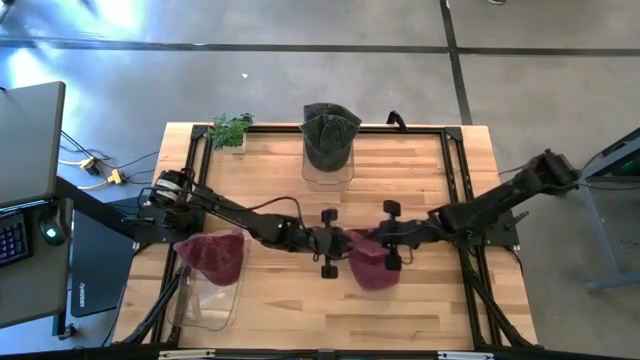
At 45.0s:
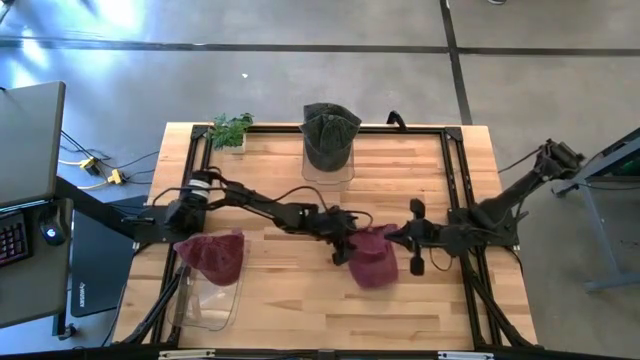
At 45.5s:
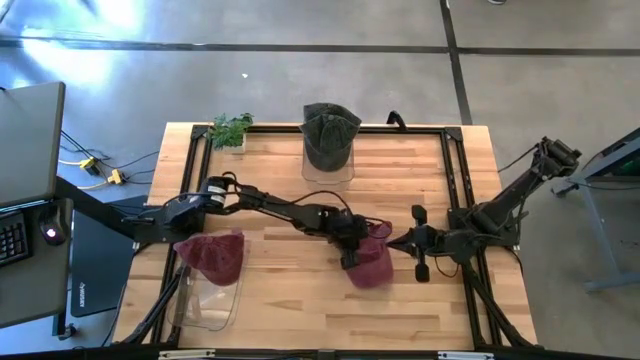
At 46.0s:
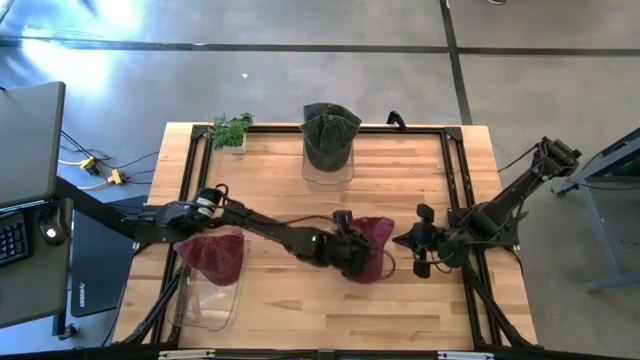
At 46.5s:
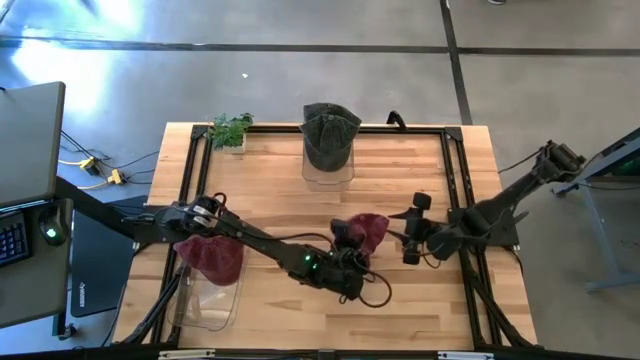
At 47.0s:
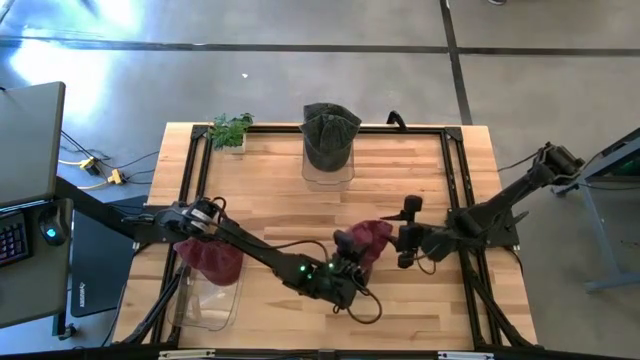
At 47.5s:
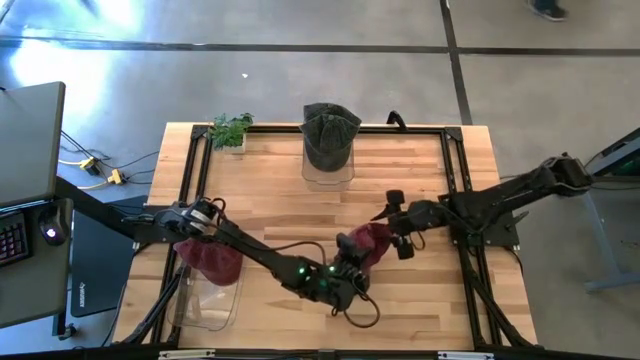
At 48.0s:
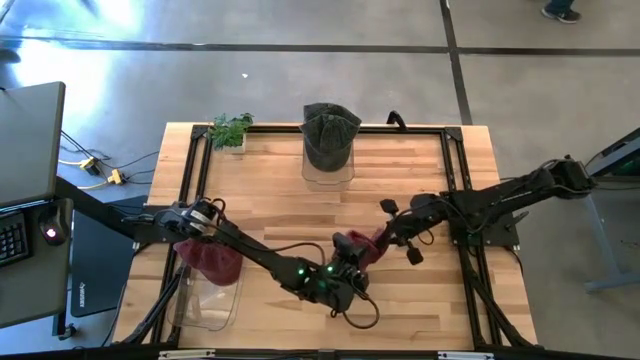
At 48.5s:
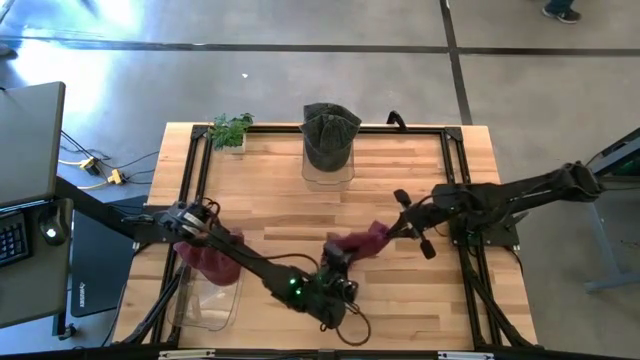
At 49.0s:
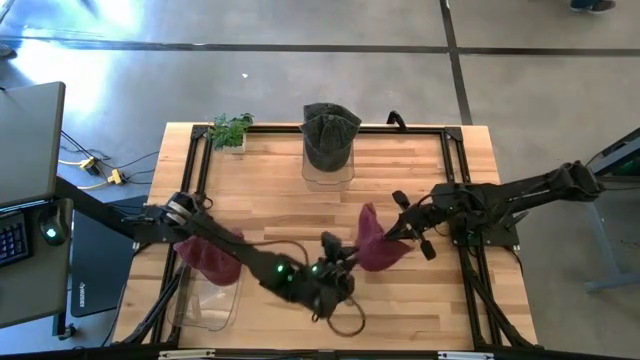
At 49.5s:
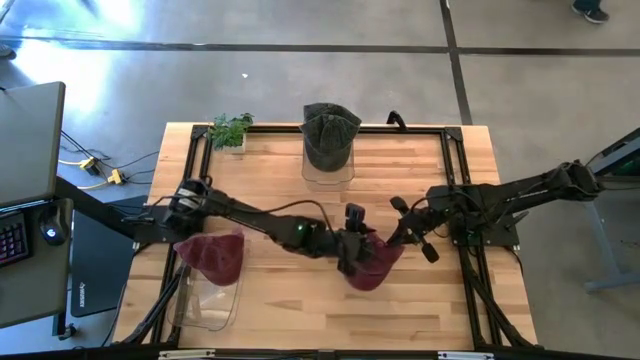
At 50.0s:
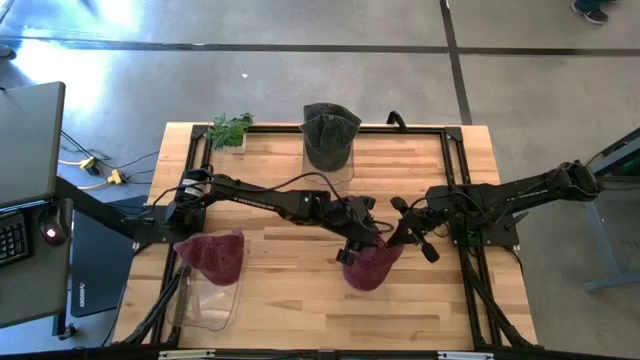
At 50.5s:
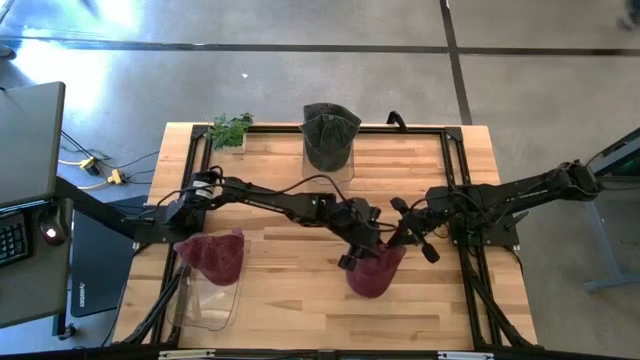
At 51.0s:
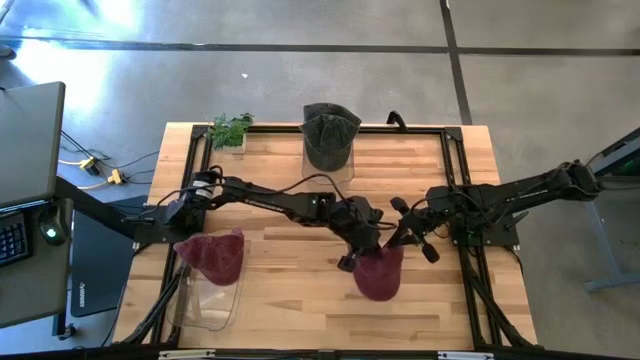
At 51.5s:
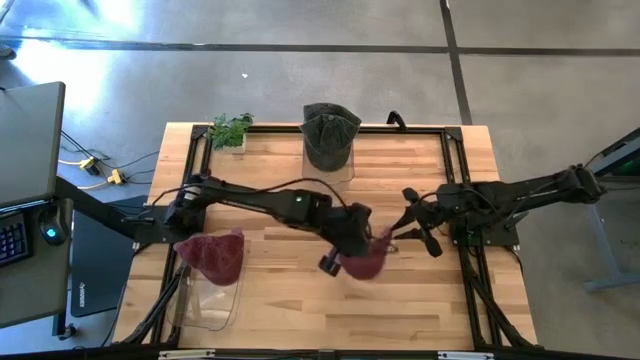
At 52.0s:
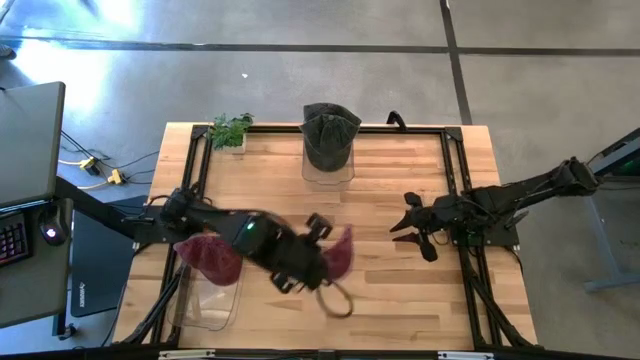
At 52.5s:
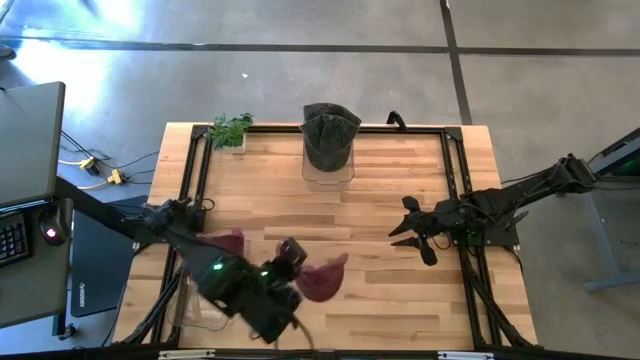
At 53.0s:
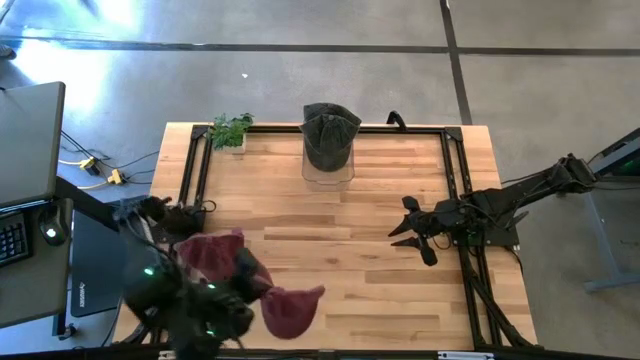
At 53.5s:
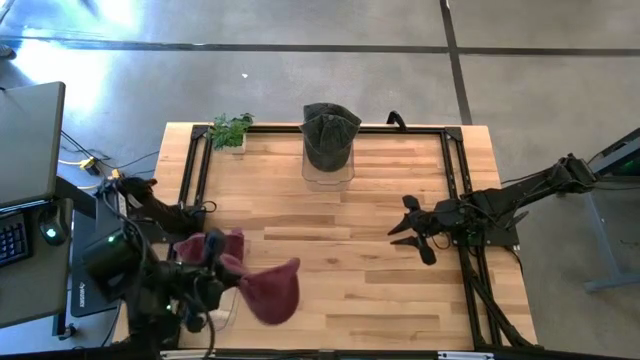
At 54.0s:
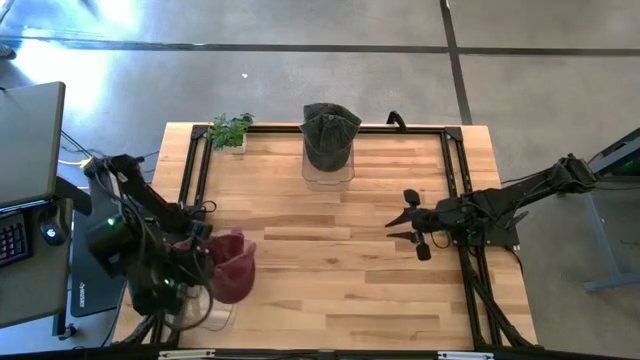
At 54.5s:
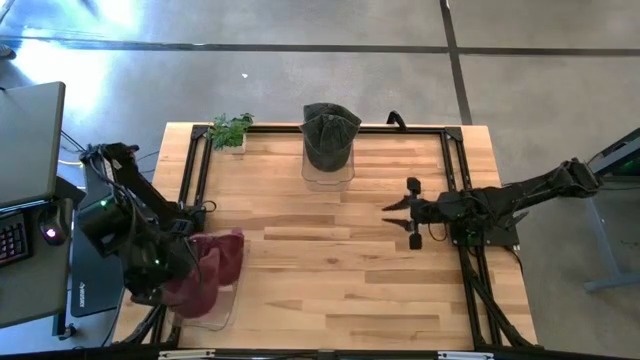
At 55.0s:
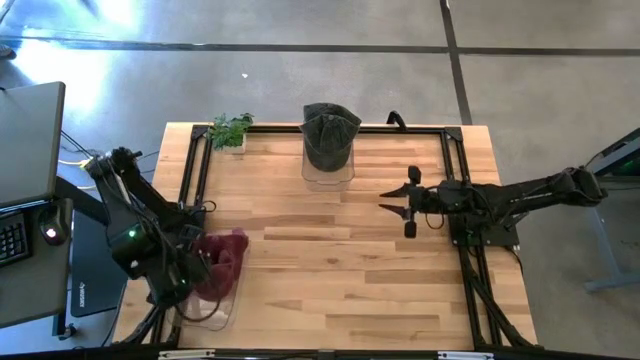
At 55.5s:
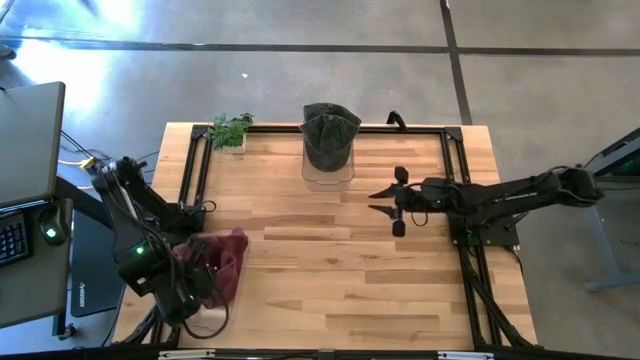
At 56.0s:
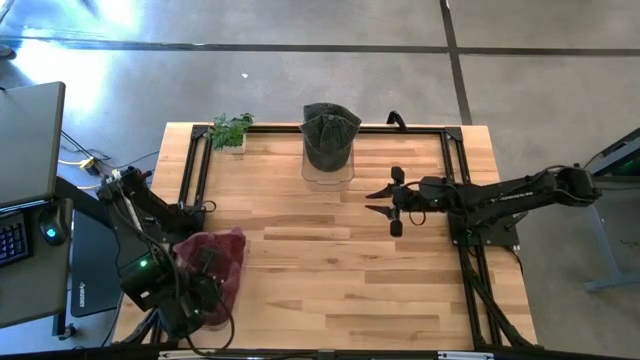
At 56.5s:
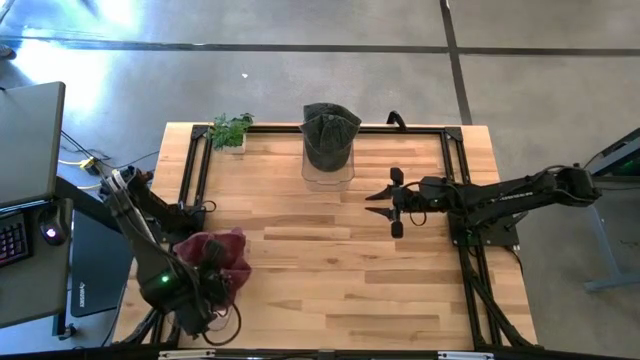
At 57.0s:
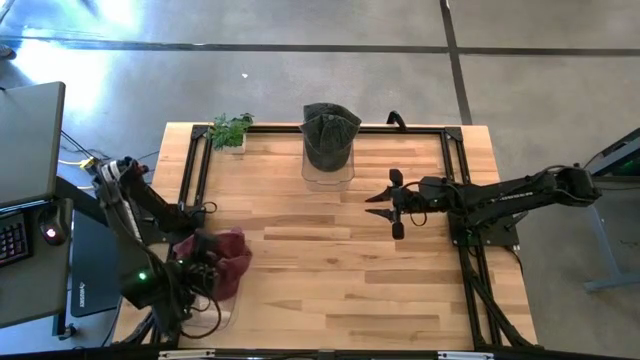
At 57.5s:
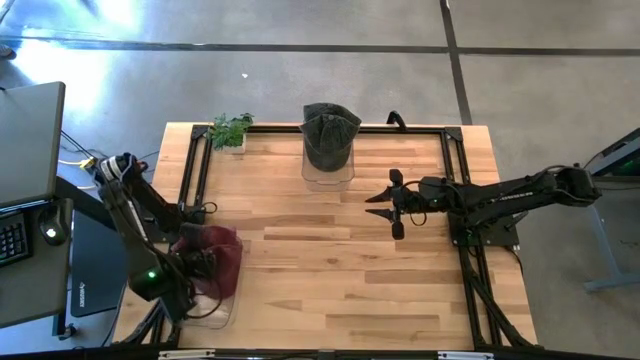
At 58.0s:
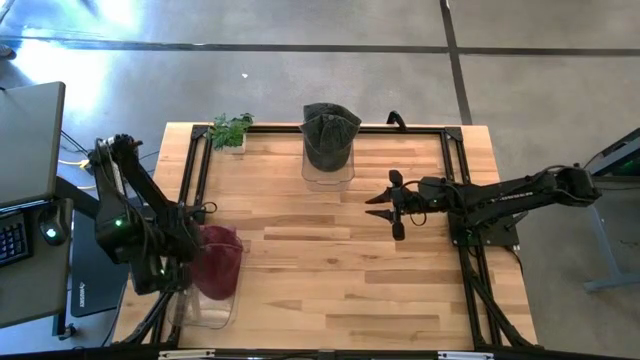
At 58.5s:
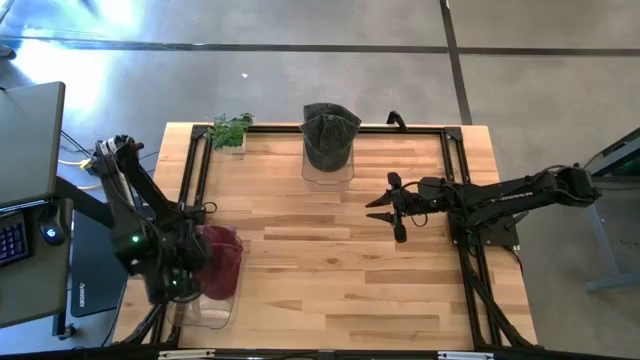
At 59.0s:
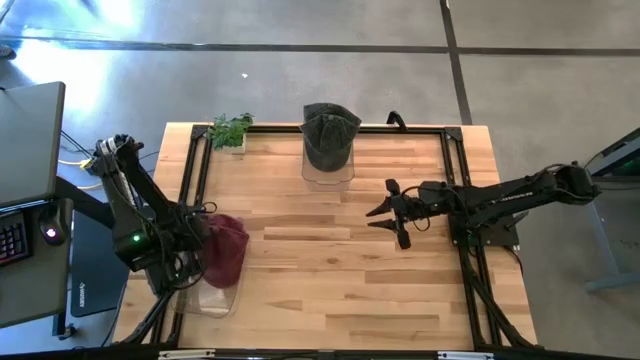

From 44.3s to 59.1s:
Task: Pick & Place hat
Put the red cap into the bottom transparent bin

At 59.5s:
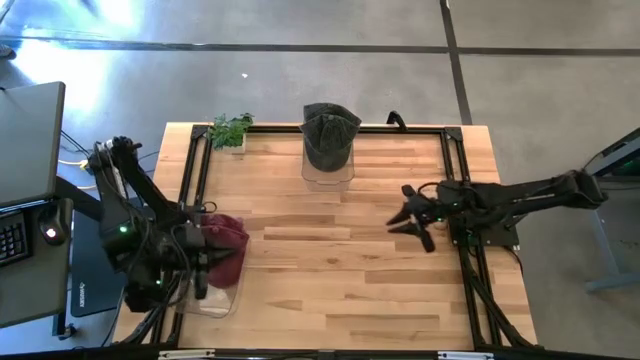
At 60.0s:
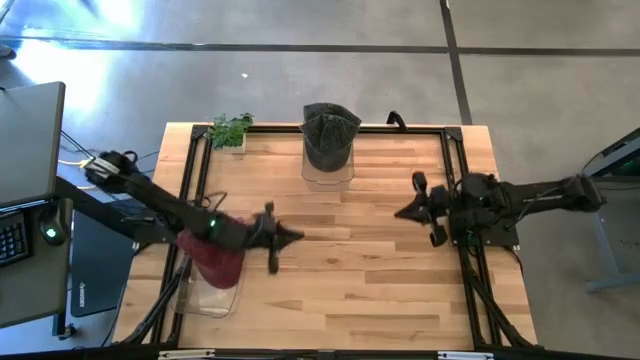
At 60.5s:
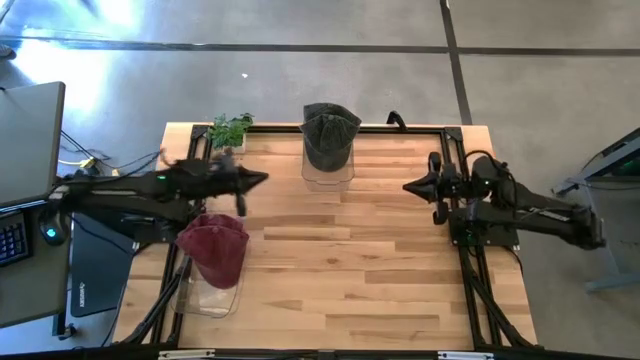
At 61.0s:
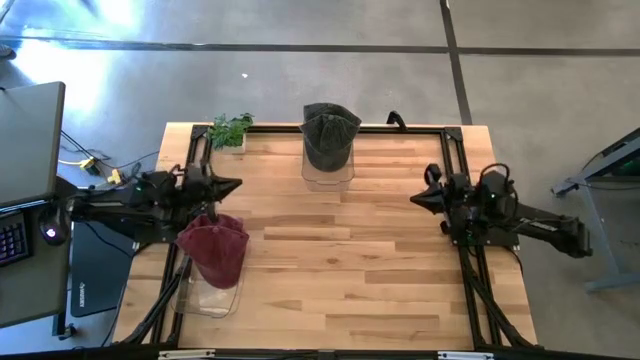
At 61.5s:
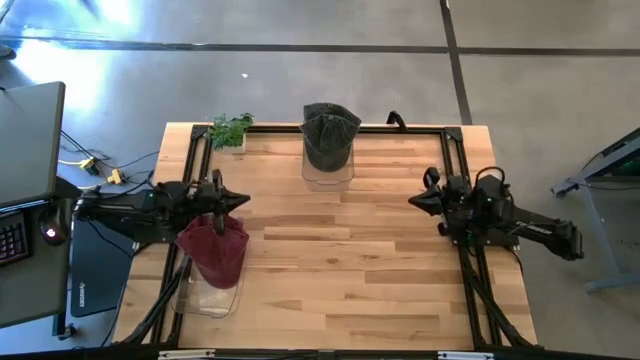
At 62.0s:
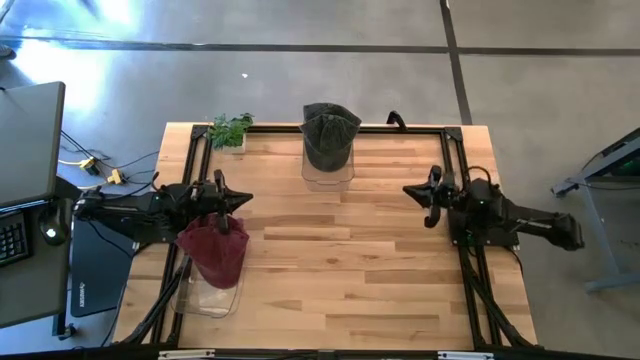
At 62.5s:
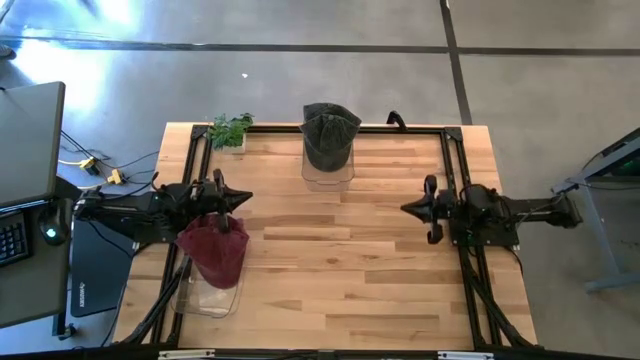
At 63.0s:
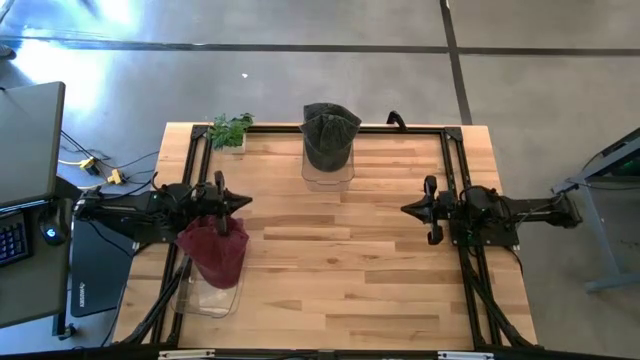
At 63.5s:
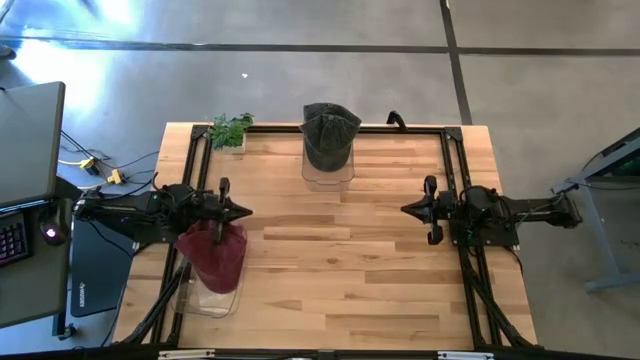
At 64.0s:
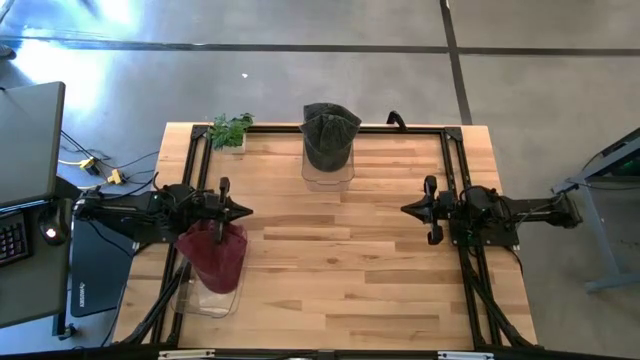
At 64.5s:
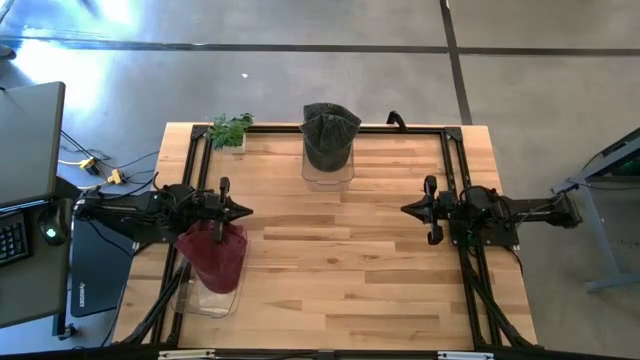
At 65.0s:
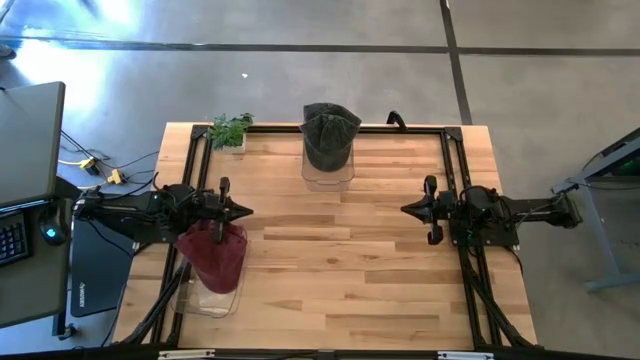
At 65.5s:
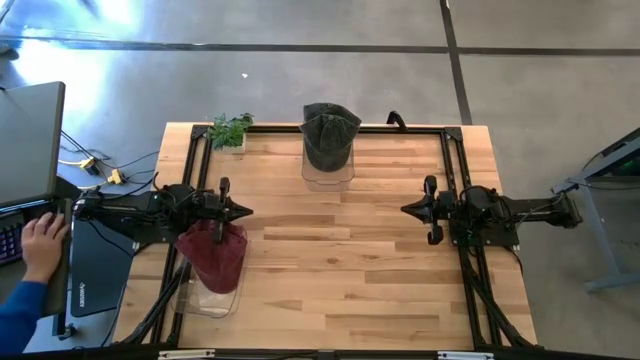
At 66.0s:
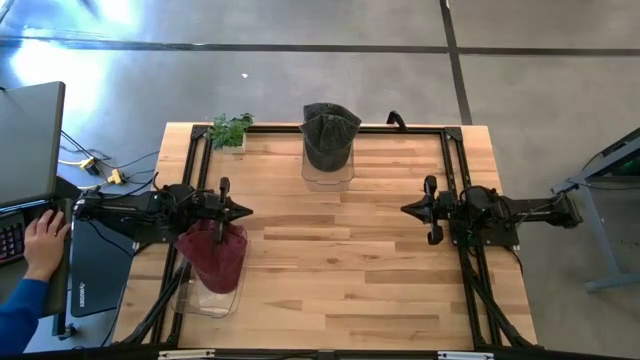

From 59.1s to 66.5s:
Return to Home Position
